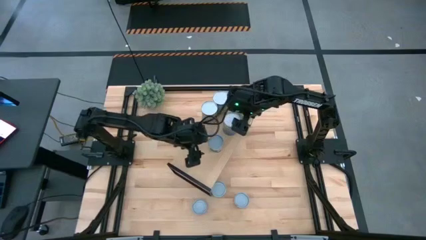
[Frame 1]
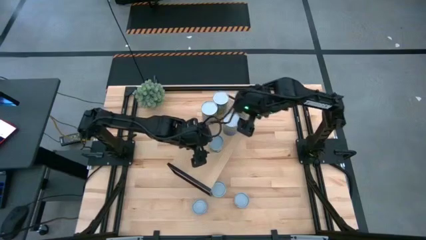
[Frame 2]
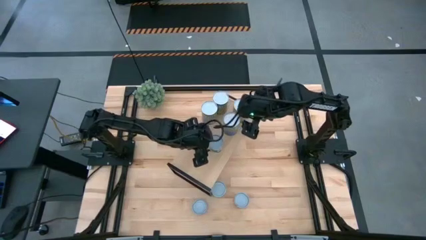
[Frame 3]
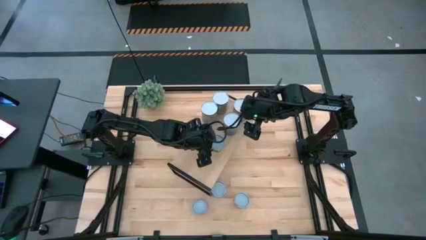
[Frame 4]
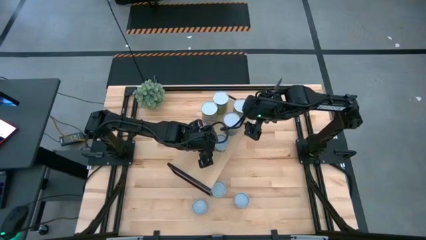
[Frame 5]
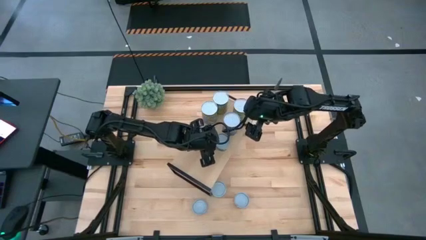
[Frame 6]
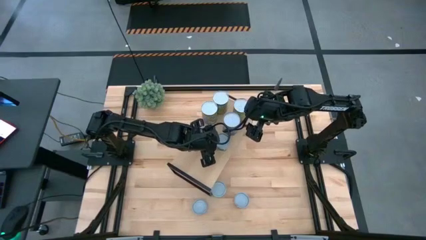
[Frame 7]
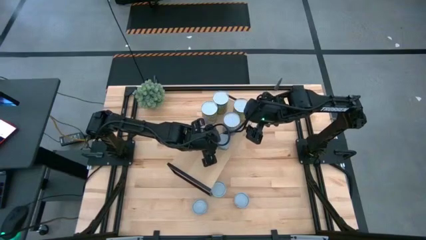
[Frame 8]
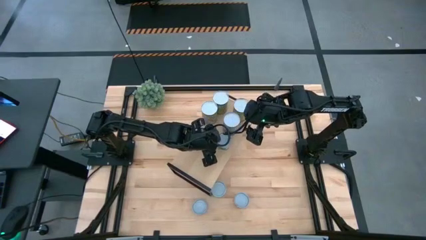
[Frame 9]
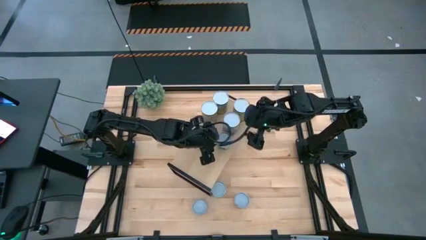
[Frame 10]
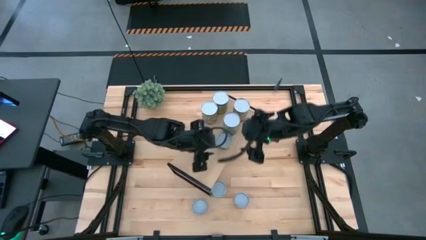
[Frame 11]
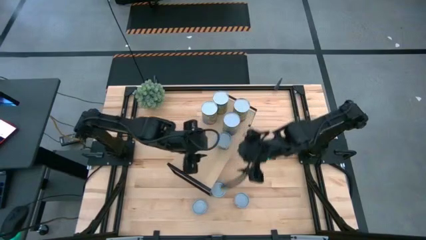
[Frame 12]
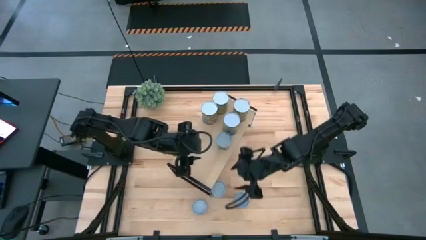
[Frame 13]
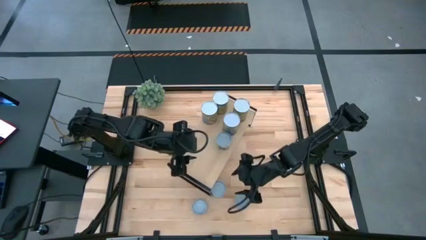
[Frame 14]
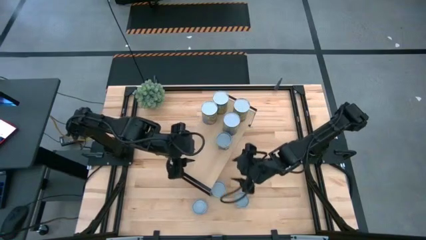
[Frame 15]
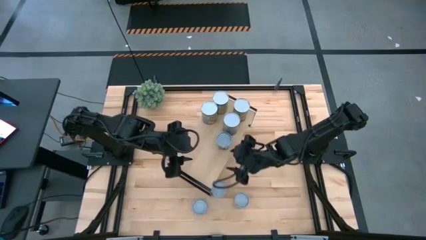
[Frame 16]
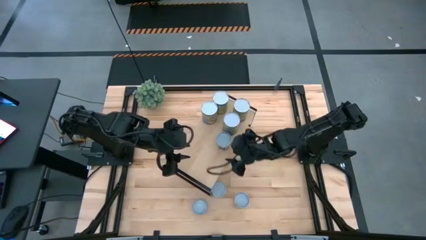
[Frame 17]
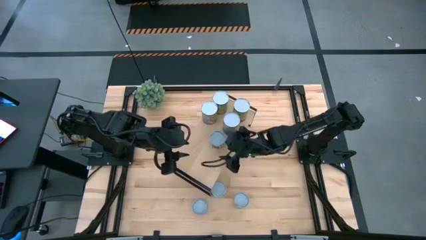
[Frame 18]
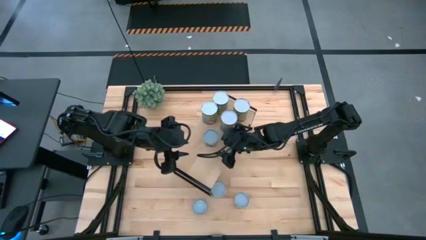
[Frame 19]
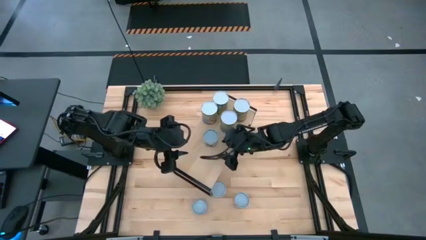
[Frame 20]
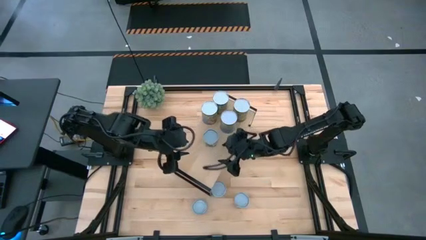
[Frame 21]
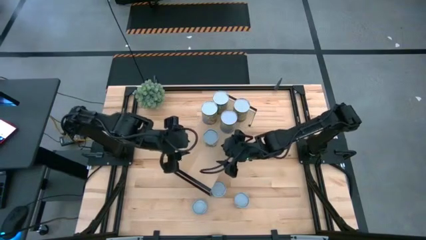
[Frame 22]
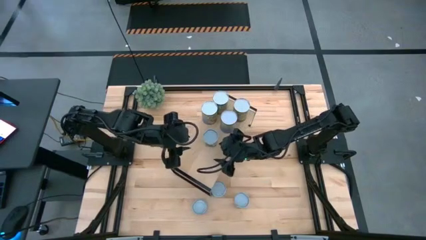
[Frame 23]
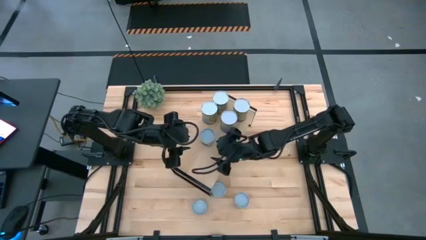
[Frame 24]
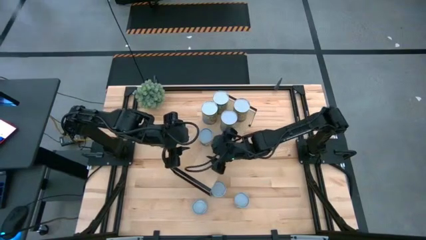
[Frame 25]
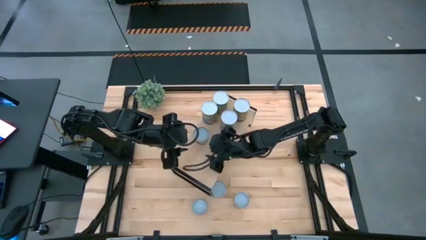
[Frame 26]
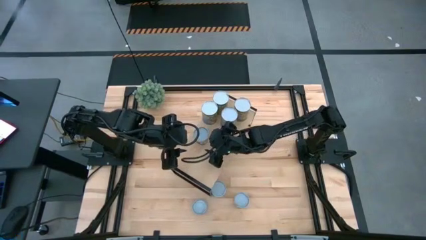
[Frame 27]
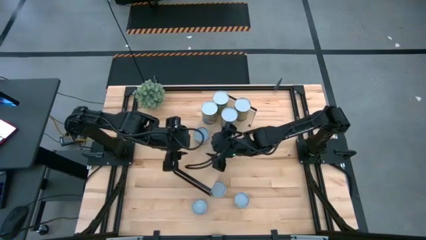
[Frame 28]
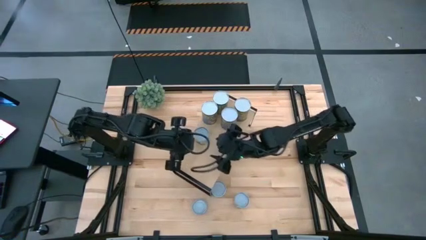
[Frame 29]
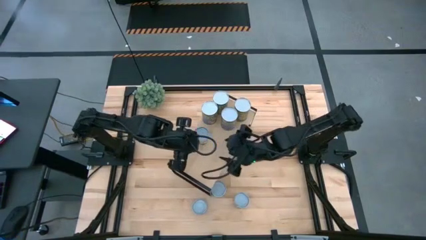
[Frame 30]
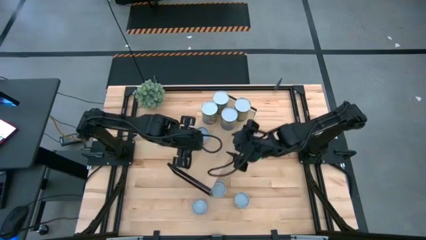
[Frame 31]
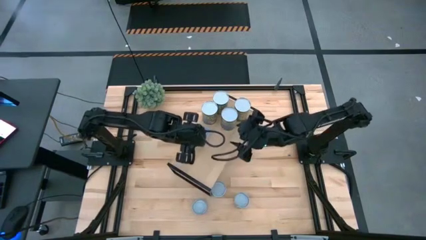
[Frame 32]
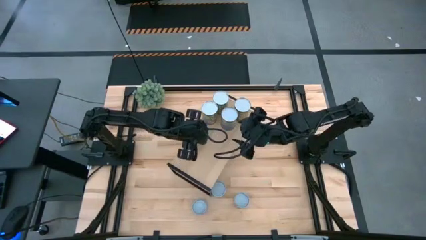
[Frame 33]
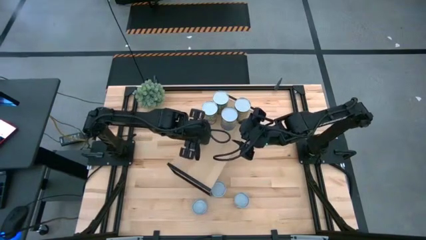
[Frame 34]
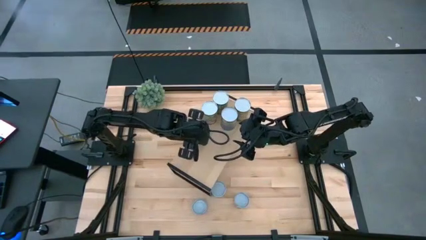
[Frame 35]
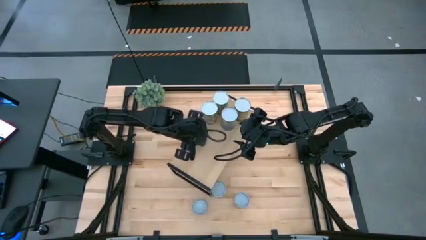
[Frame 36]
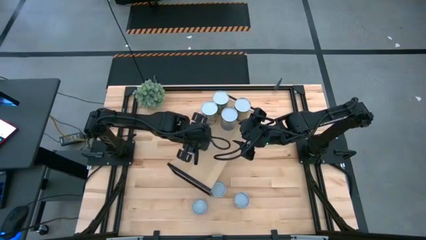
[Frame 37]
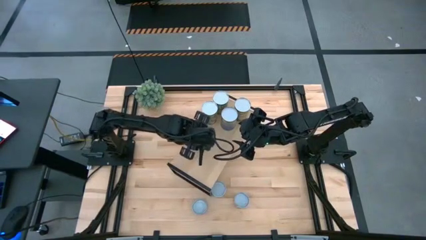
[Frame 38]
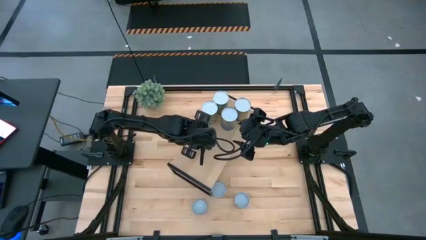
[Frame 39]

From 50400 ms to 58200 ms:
Task: Pick and place cans onto a shelf
Adjust the canned green peas on the shelf

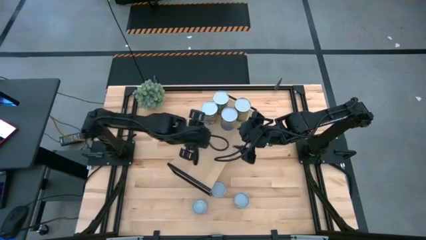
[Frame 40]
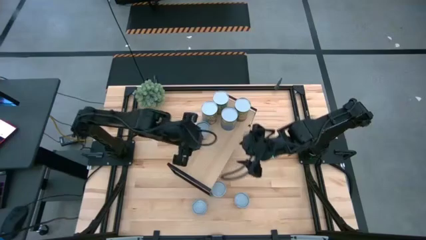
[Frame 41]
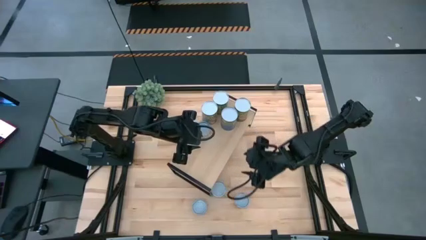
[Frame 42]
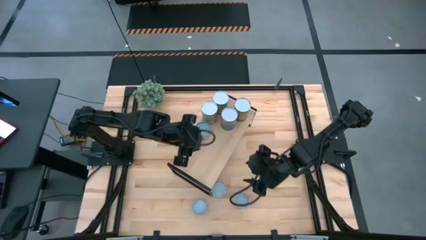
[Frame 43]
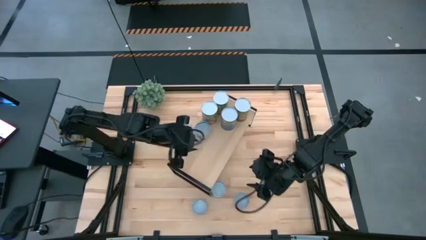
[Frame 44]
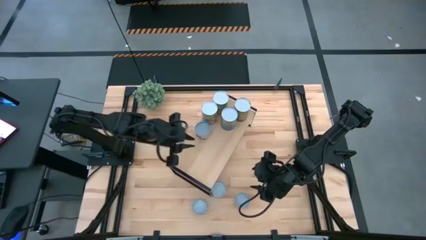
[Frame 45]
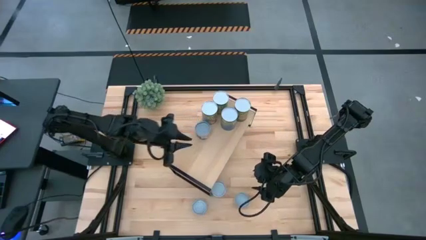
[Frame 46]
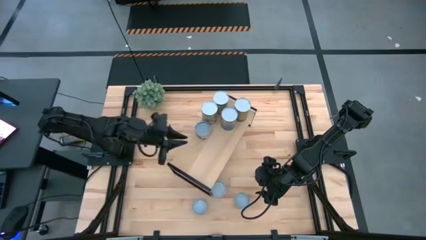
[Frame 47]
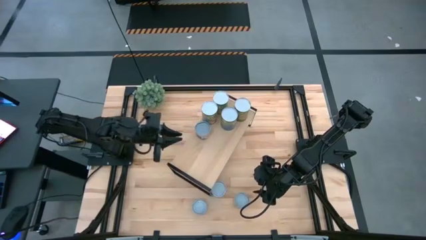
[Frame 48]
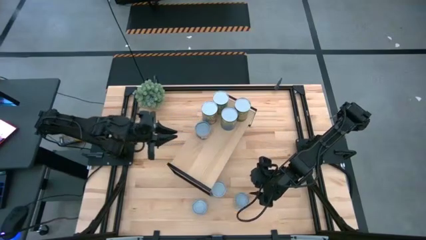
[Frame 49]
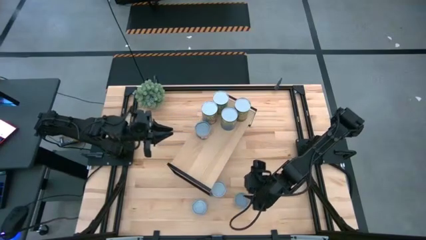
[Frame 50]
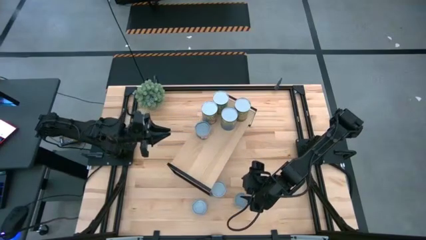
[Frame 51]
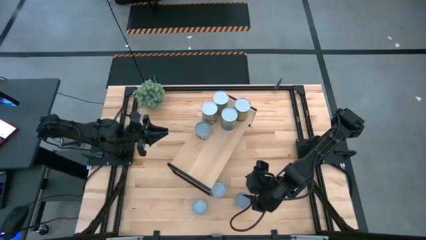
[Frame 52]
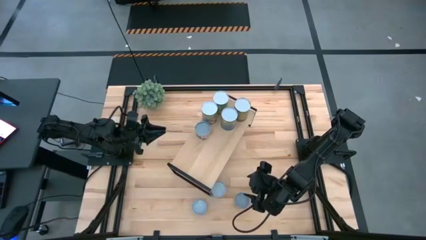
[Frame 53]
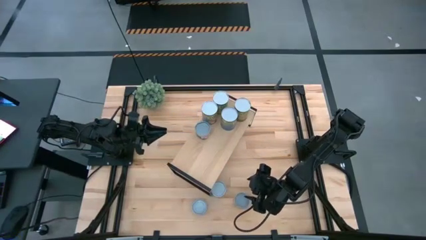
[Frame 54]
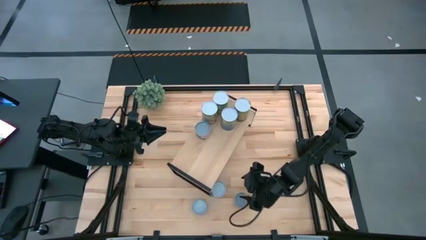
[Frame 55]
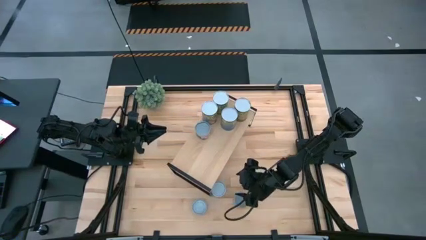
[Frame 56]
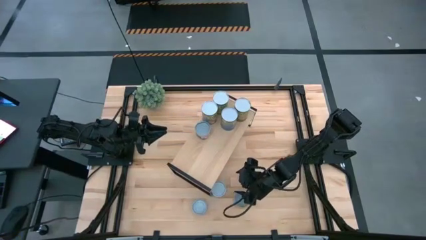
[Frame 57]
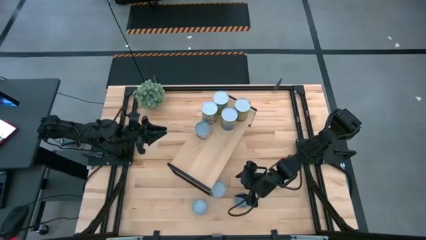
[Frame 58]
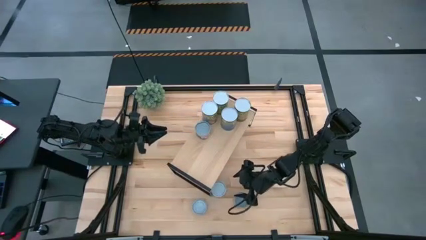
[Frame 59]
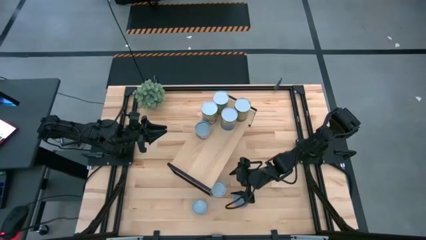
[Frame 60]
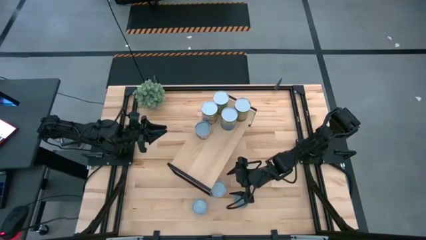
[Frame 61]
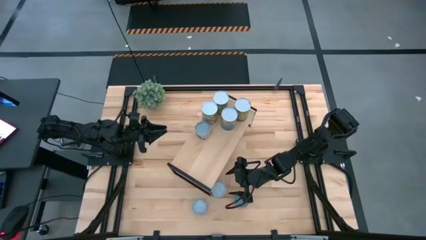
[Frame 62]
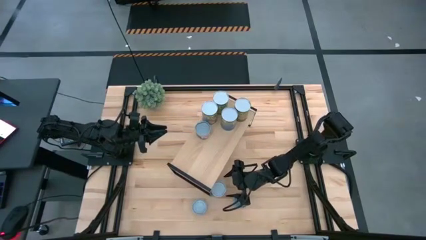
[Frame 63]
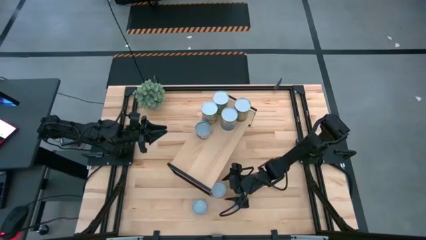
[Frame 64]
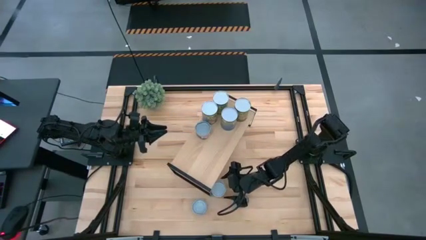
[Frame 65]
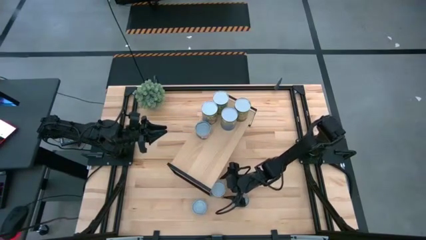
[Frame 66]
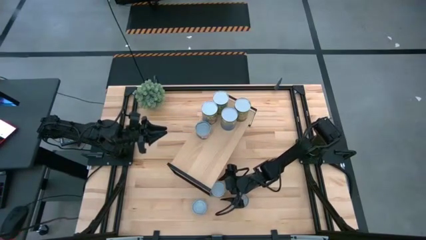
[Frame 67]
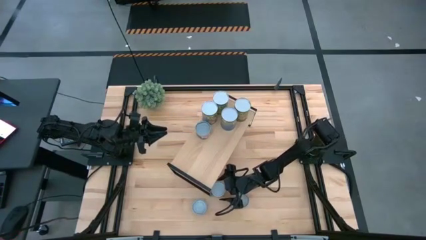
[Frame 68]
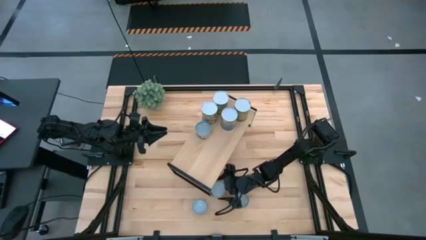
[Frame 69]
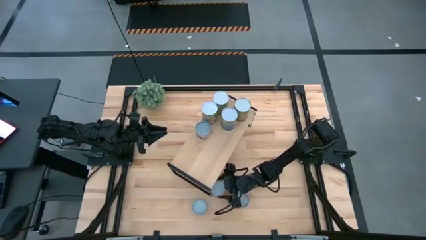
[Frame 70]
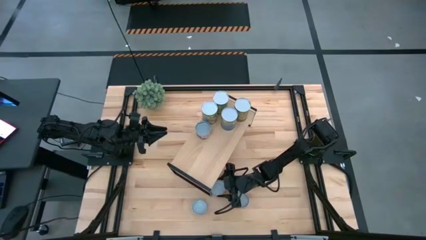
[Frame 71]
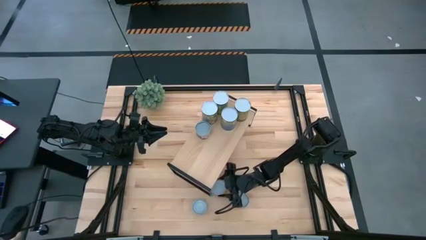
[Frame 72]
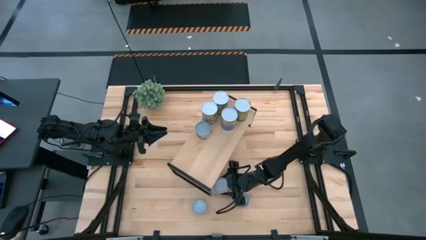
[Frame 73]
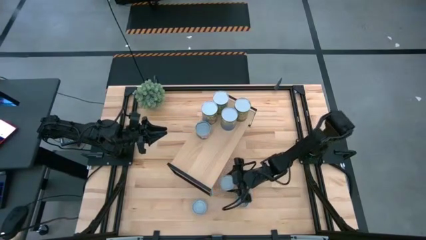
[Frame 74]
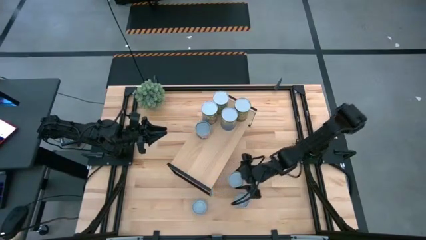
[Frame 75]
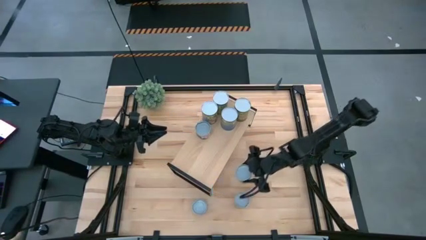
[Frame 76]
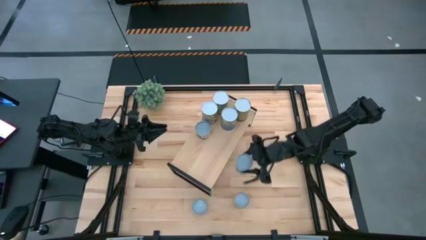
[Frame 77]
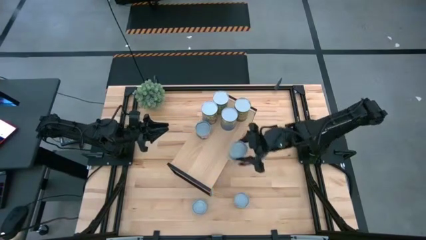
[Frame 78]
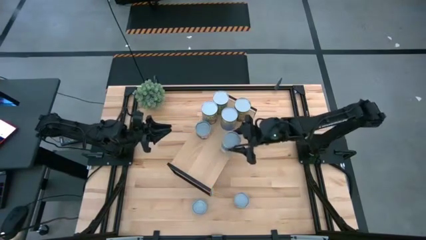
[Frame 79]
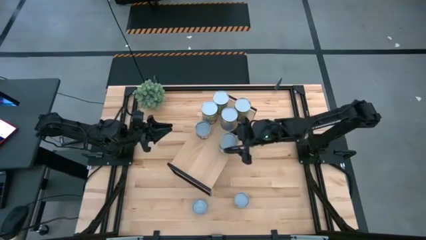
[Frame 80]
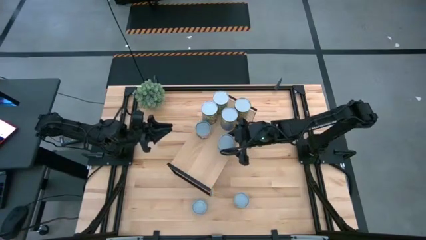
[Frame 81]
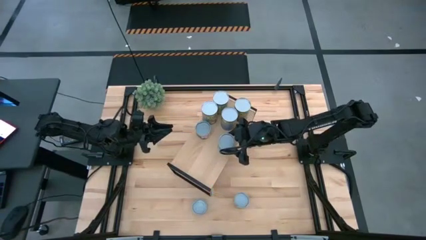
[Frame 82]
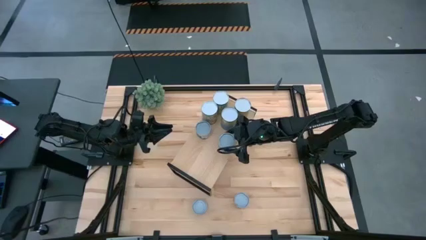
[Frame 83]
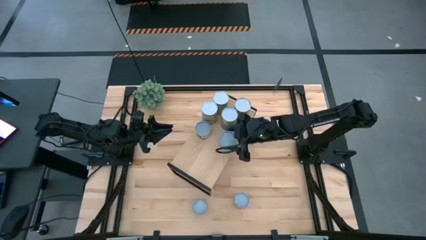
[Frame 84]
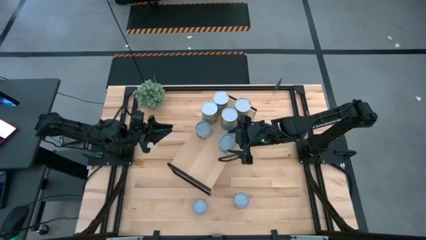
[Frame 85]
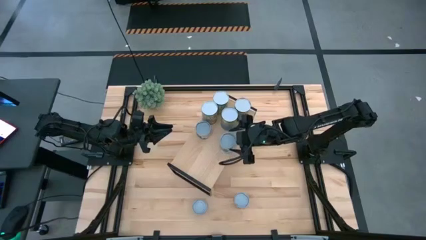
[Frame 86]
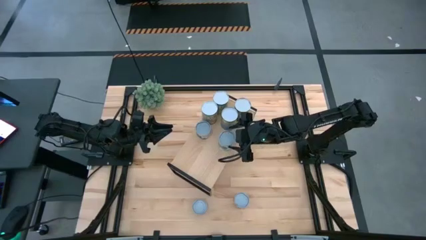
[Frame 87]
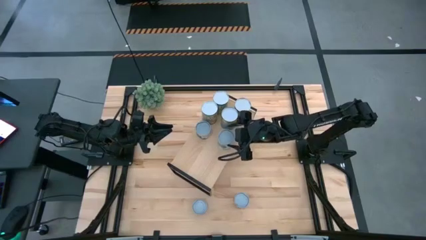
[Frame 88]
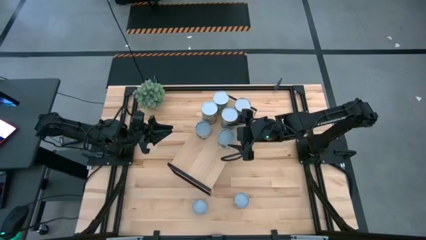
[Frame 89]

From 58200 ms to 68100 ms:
Put the canned mixed vegetables on the shelf
